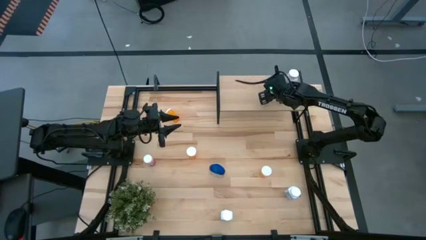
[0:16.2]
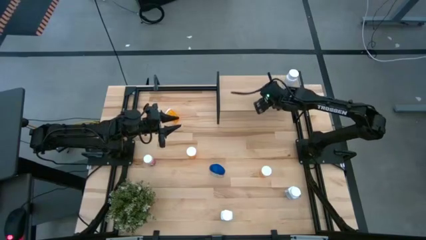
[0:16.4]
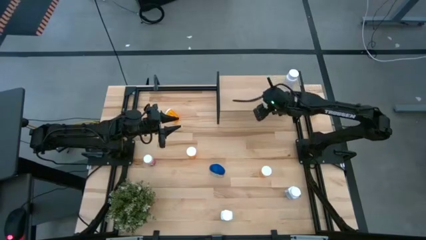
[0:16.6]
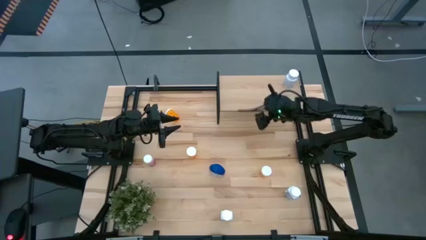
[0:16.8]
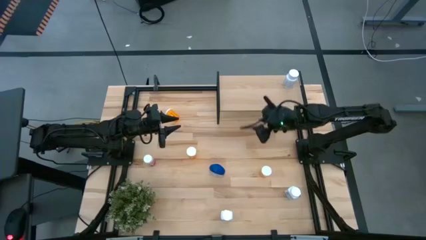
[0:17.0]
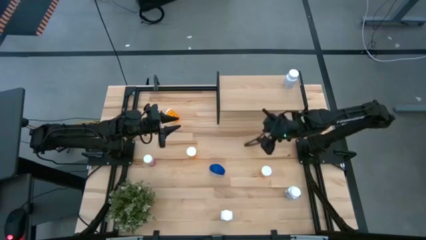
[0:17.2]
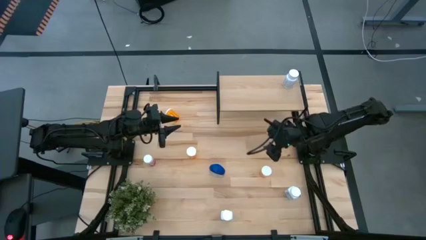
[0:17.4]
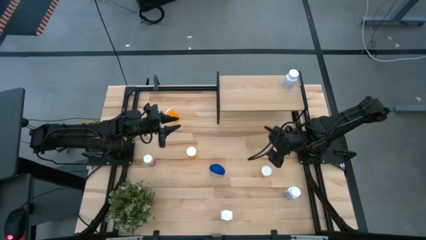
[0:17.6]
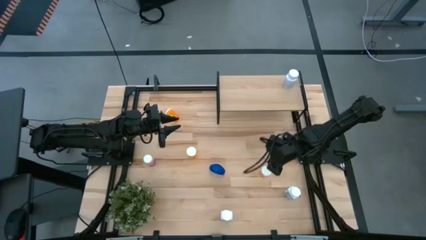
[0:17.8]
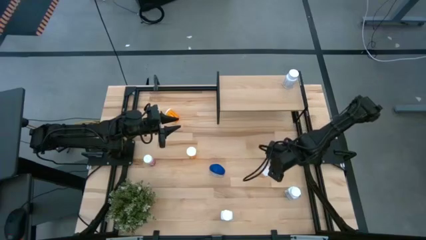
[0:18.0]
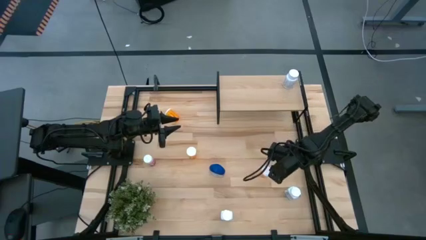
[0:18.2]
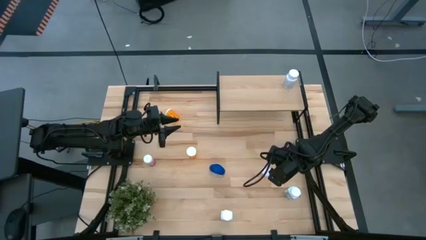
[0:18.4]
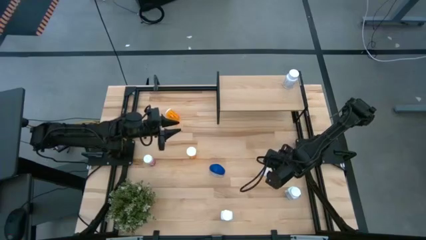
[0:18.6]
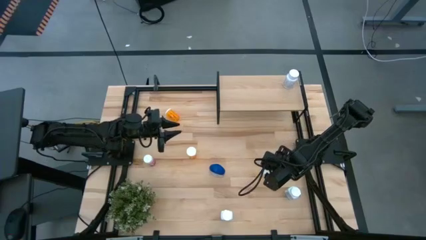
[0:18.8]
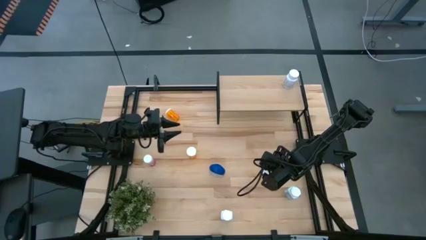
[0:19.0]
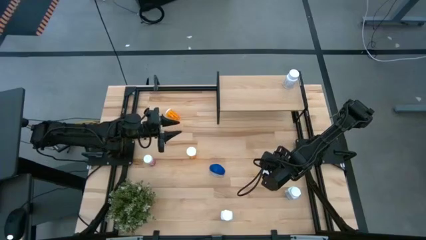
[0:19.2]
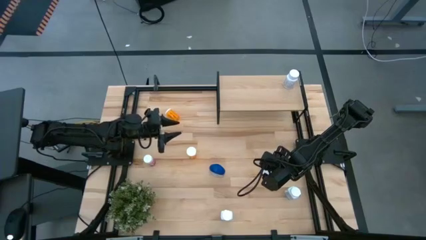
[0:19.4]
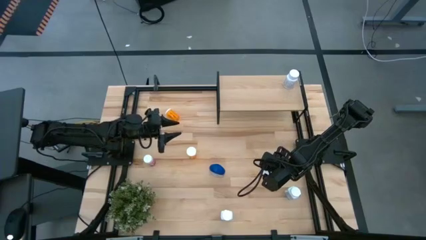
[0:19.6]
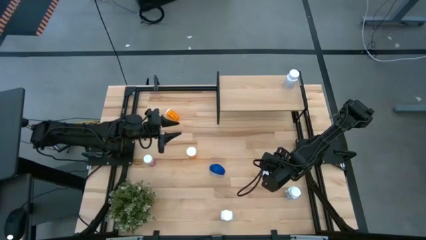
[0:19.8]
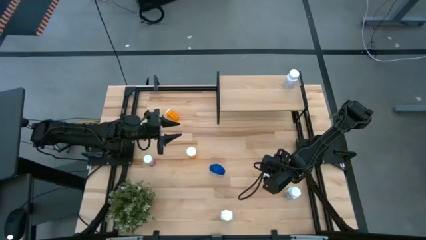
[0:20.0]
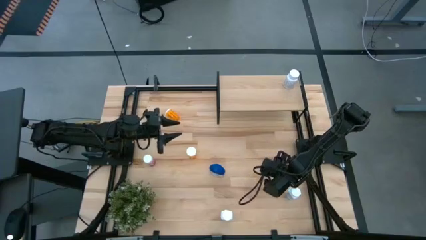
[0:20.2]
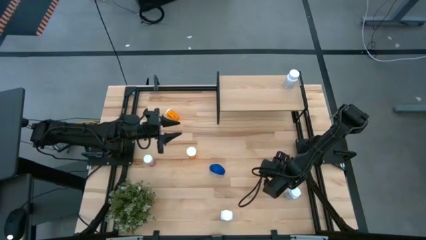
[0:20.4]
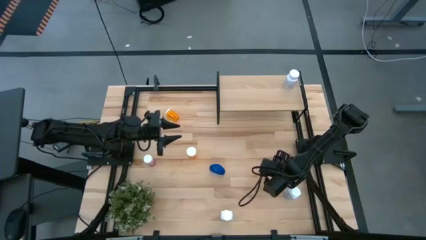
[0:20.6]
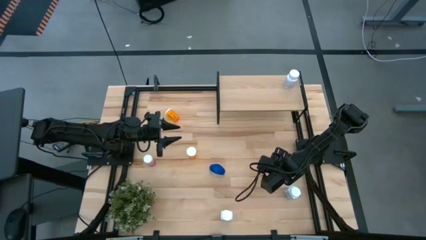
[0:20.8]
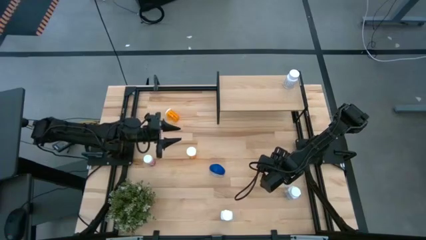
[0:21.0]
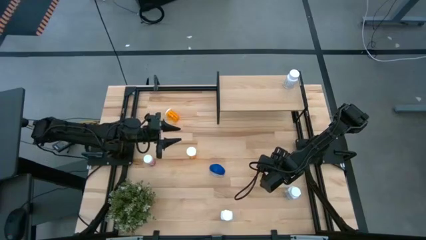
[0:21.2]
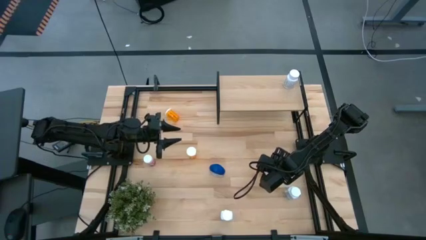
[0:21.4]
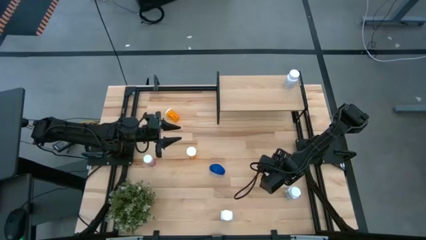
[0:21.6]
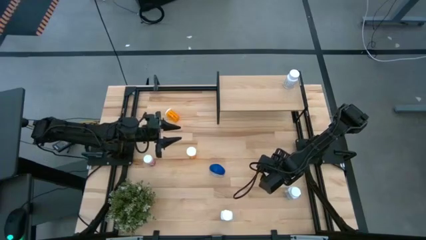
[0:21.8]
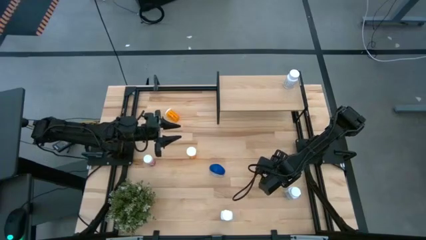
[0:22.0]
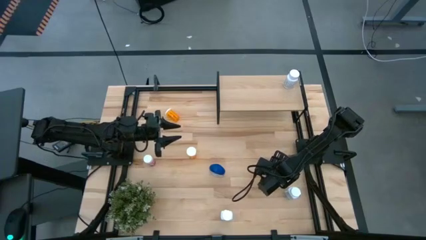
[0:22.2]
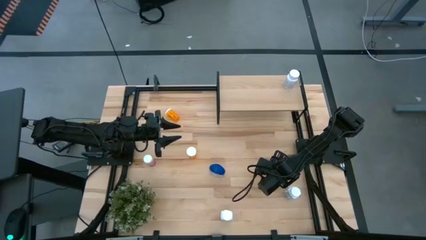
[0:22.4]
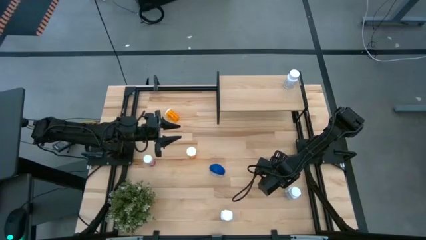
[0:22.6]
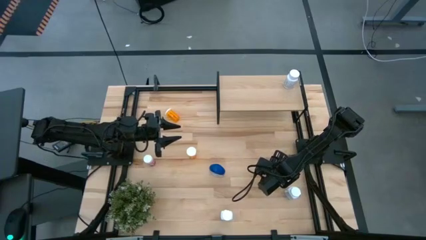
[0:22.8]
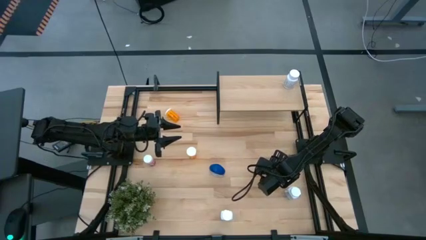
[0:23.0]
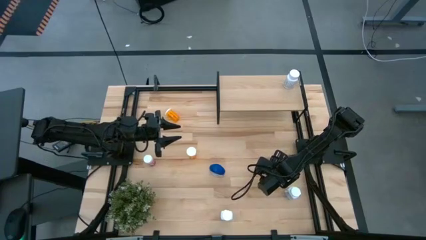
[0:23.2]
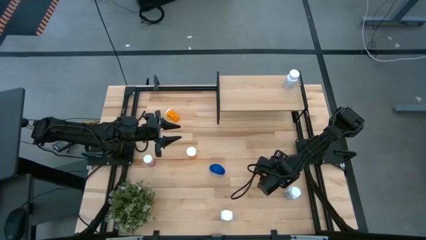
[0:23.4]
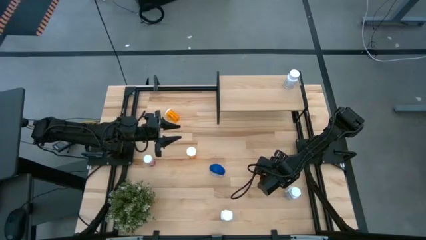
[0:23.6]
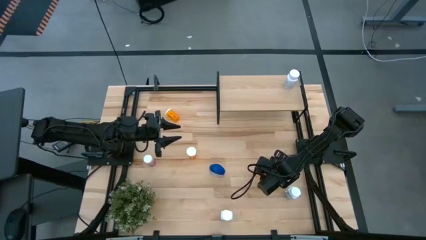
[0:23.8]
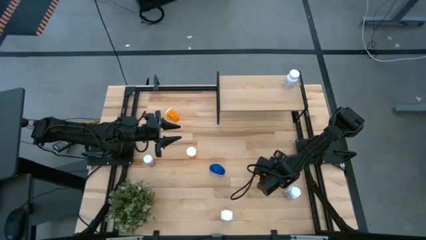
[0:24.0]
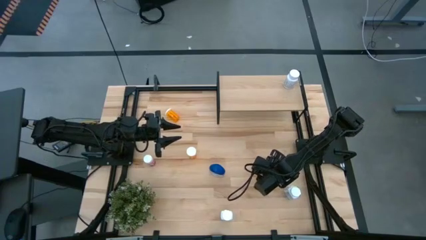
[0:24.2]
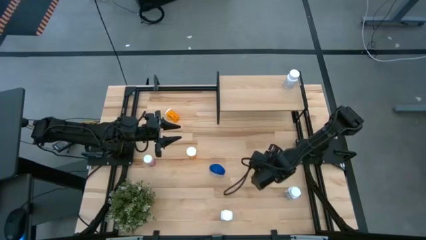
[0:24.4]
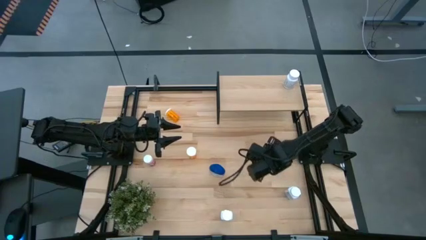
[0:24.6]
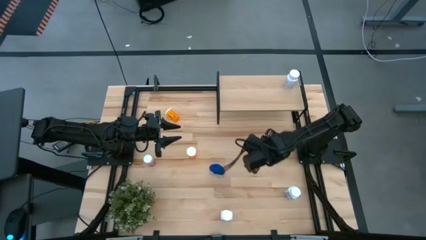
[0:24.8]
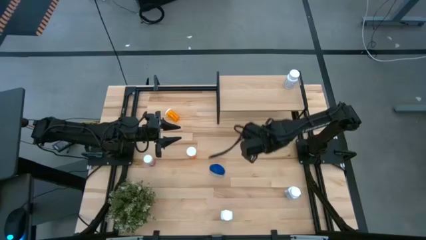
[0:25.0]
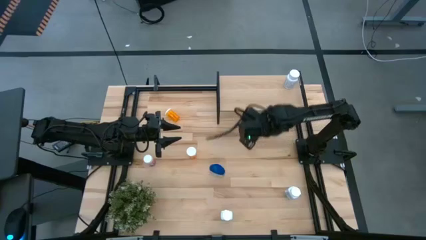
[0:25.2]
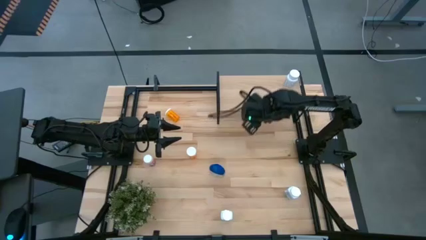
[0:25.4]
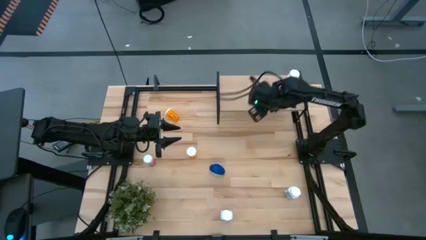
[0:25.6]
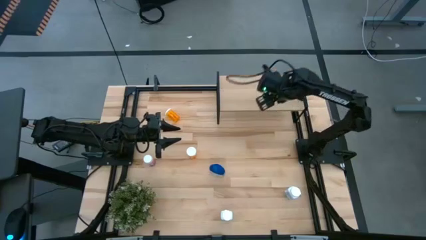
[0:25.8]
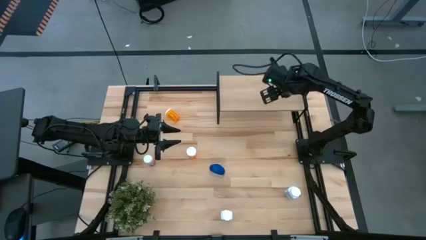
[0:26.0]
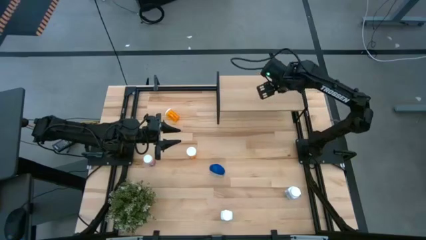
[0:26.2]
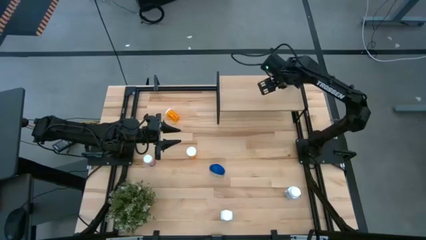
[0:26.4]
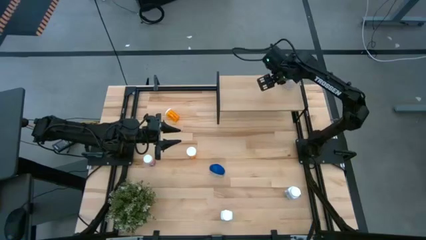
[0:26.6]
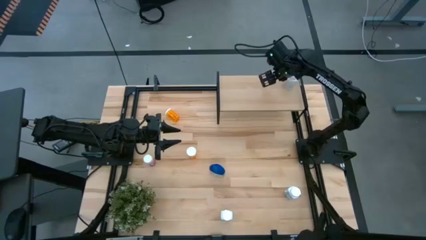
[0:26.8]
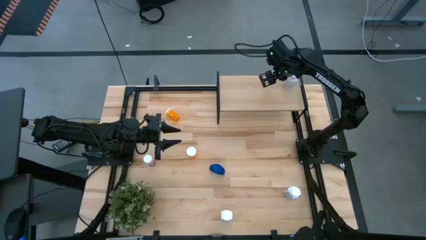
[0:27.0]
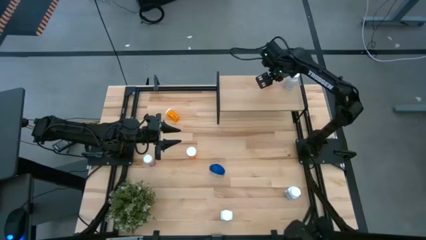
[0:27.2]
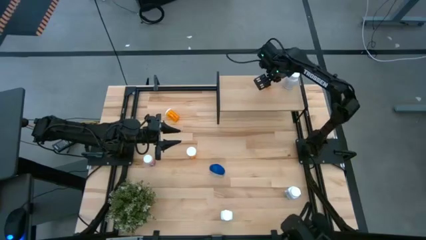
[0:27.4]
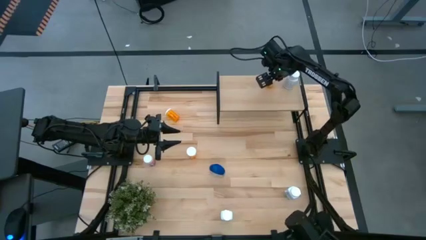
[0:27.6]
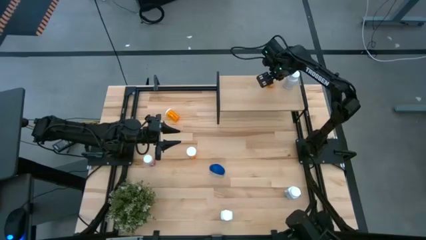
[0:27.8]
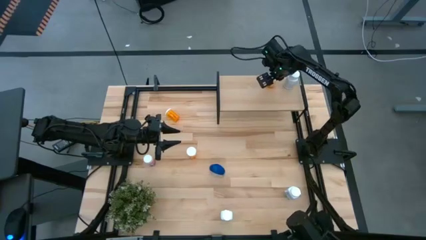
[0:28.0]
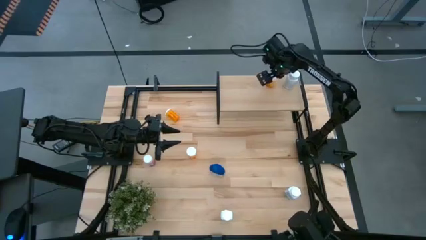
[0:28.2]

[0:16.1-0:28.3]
Task: Pick and place medicine bottles onto shelf by color
Put the bottom right orange pill bottle on the shelf
